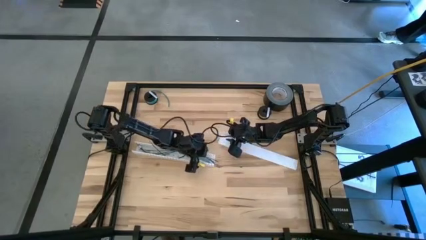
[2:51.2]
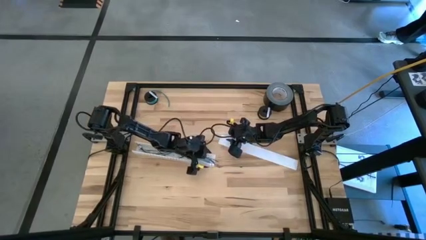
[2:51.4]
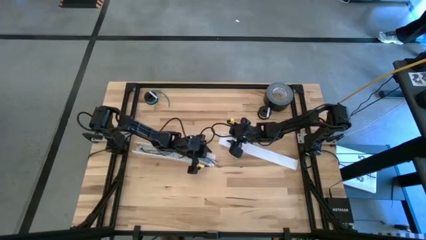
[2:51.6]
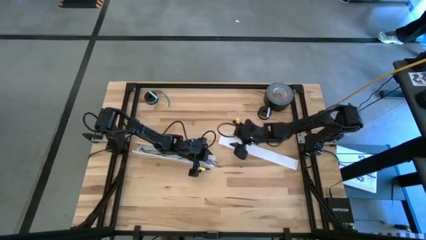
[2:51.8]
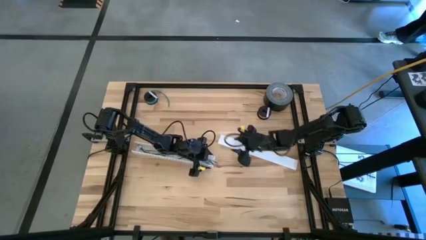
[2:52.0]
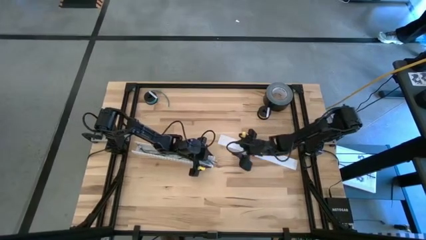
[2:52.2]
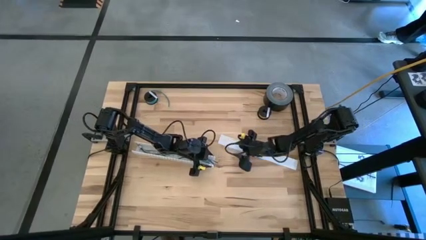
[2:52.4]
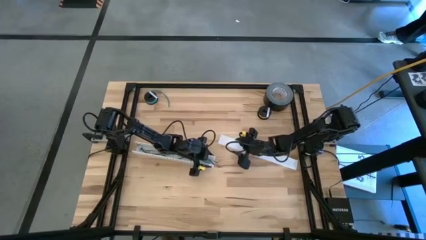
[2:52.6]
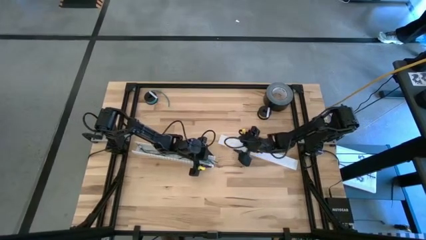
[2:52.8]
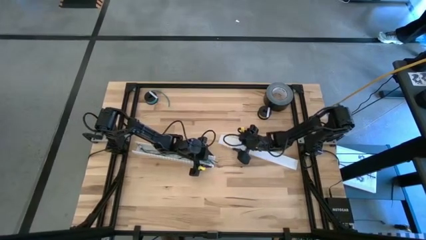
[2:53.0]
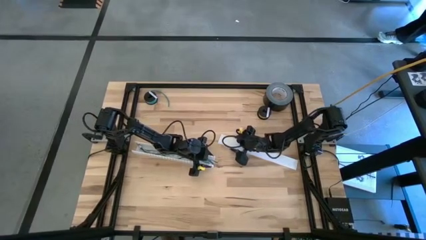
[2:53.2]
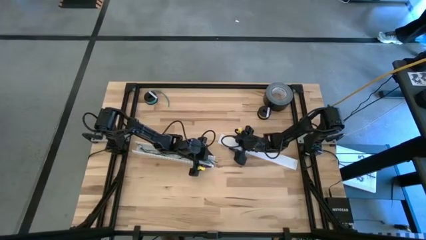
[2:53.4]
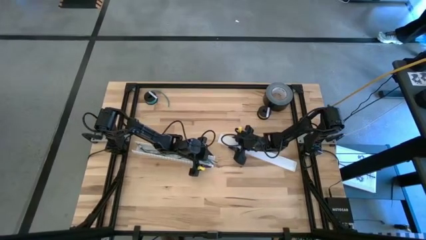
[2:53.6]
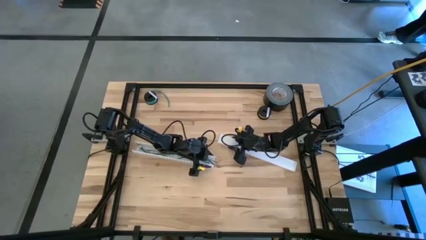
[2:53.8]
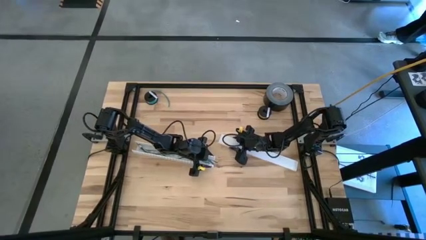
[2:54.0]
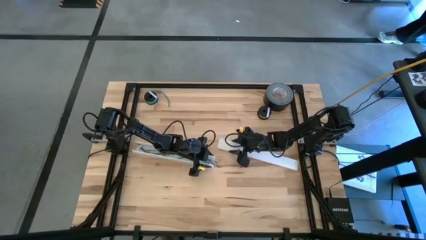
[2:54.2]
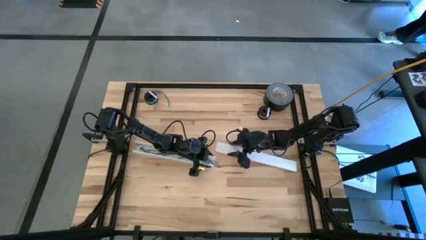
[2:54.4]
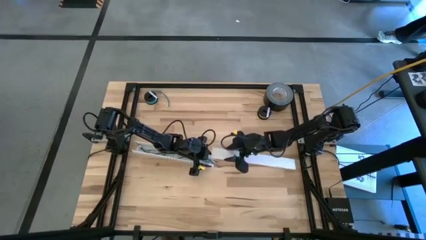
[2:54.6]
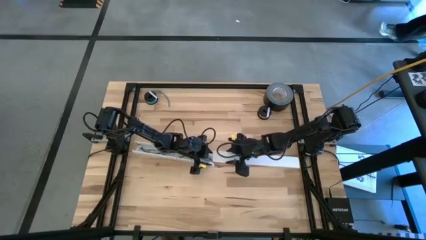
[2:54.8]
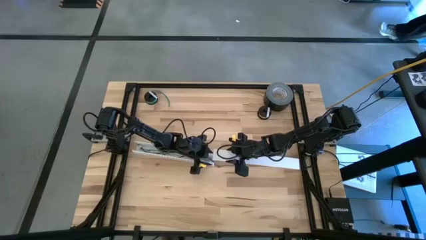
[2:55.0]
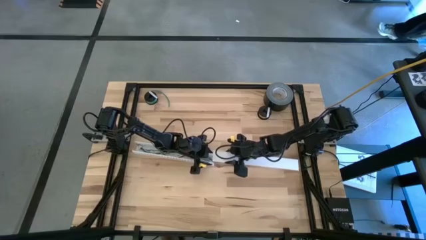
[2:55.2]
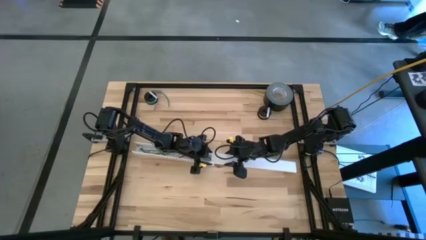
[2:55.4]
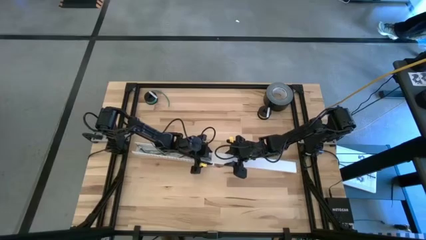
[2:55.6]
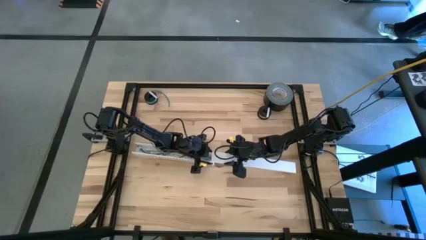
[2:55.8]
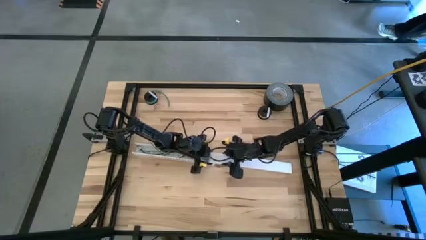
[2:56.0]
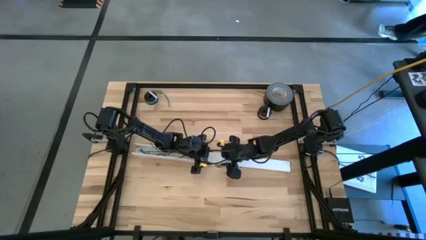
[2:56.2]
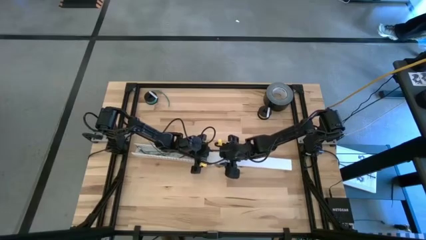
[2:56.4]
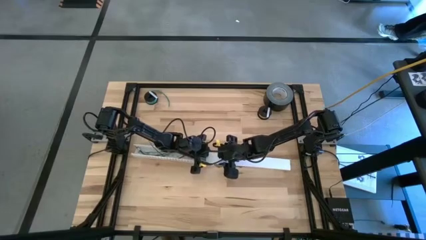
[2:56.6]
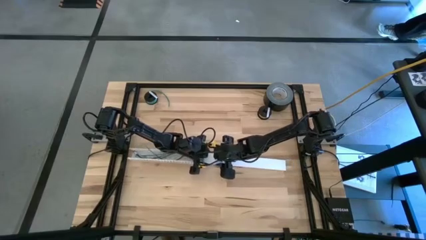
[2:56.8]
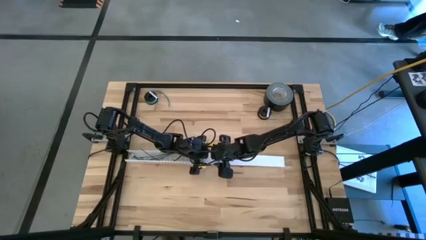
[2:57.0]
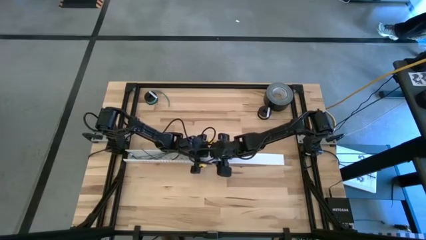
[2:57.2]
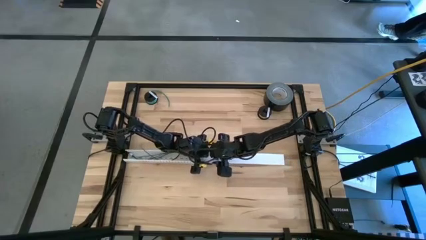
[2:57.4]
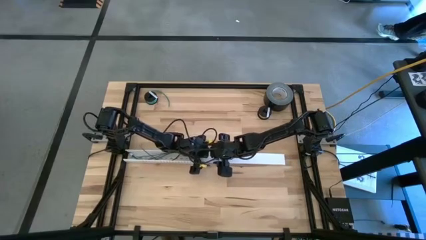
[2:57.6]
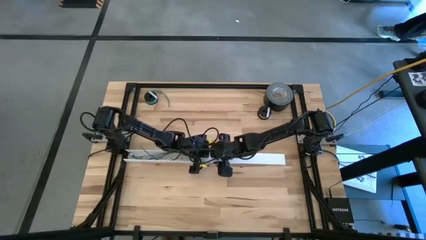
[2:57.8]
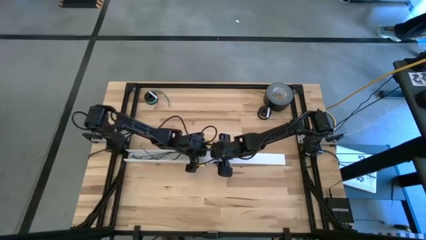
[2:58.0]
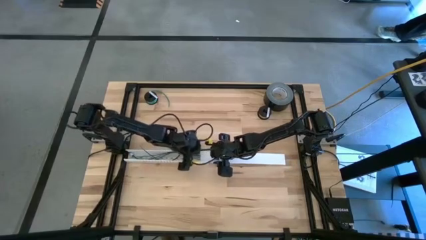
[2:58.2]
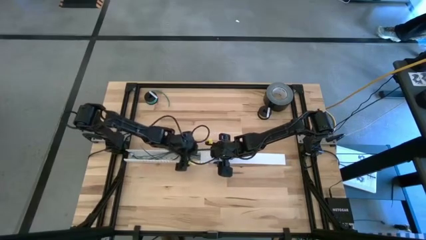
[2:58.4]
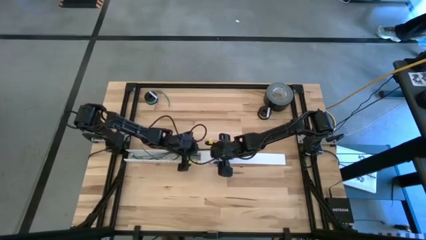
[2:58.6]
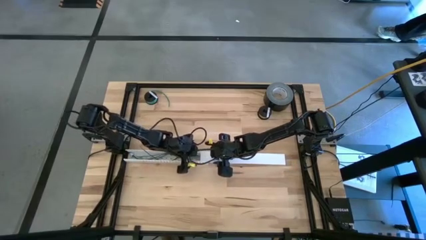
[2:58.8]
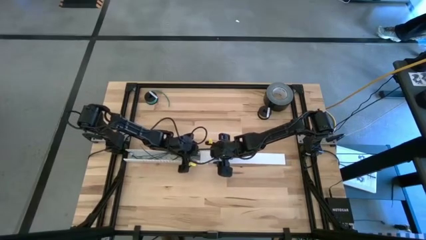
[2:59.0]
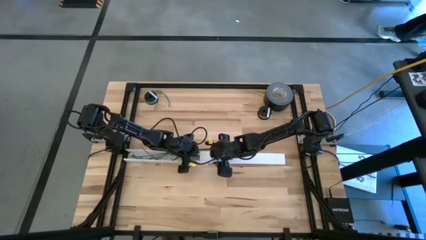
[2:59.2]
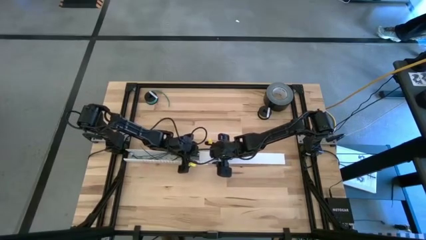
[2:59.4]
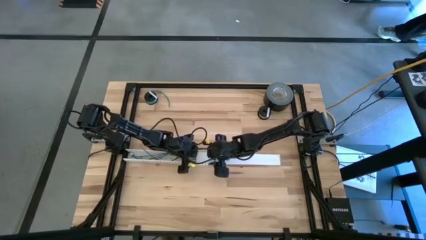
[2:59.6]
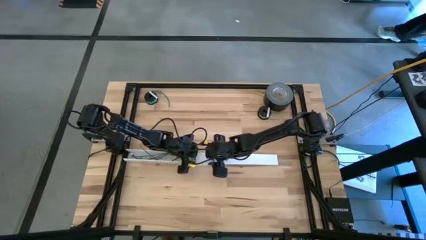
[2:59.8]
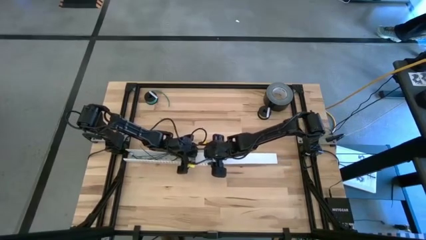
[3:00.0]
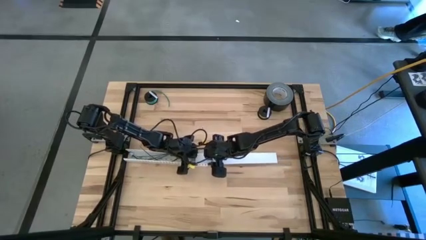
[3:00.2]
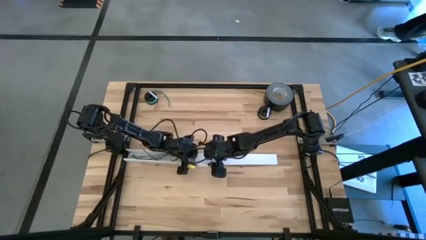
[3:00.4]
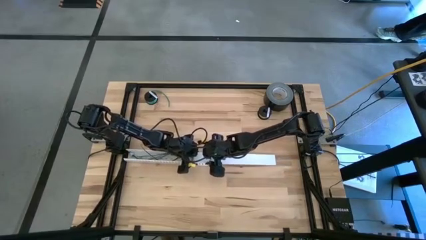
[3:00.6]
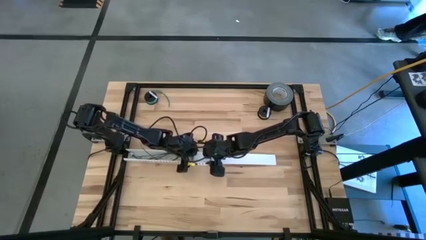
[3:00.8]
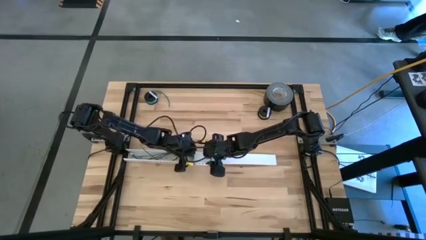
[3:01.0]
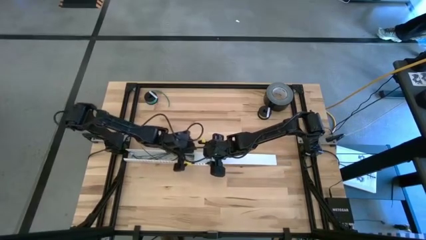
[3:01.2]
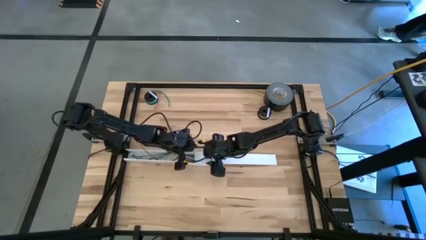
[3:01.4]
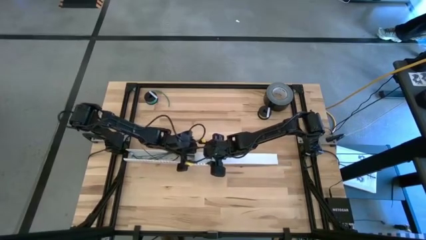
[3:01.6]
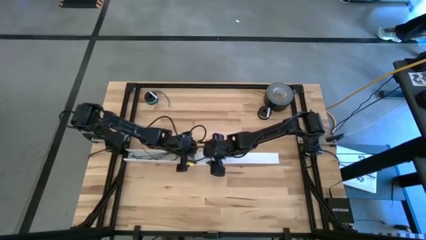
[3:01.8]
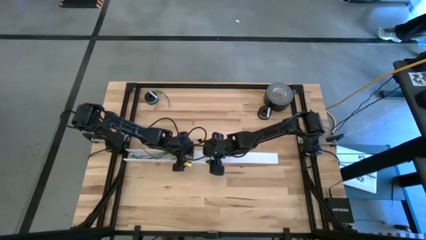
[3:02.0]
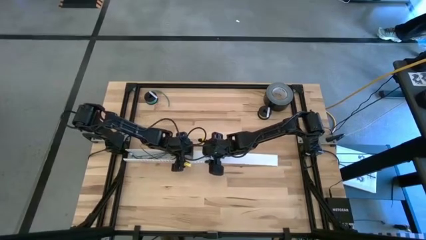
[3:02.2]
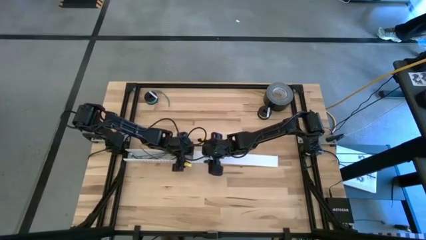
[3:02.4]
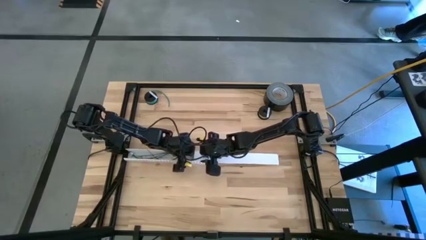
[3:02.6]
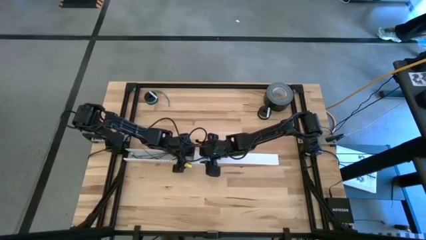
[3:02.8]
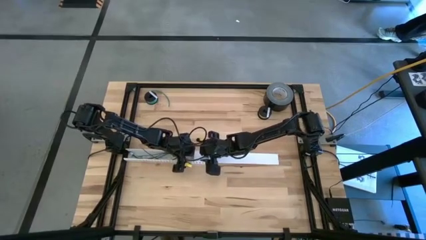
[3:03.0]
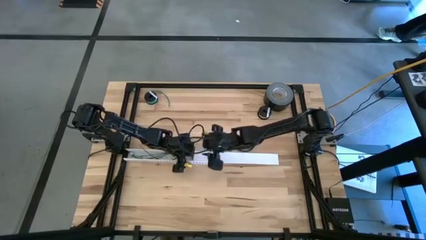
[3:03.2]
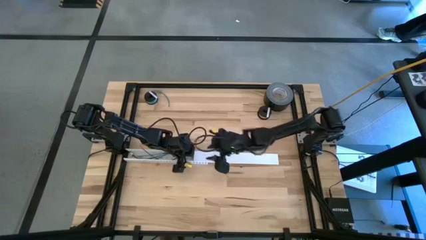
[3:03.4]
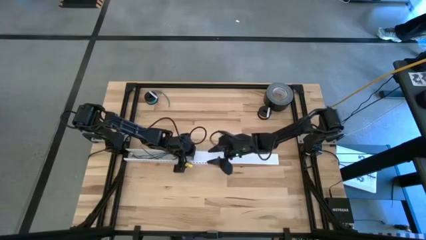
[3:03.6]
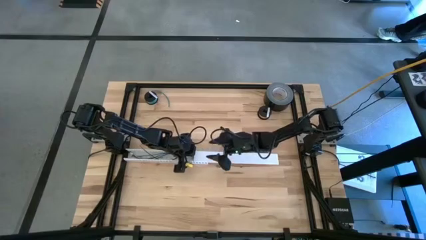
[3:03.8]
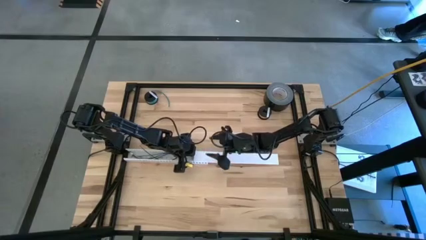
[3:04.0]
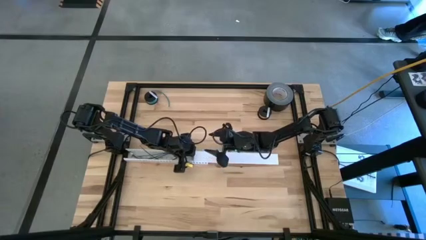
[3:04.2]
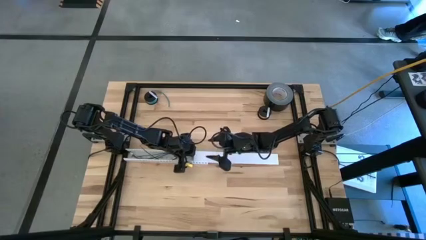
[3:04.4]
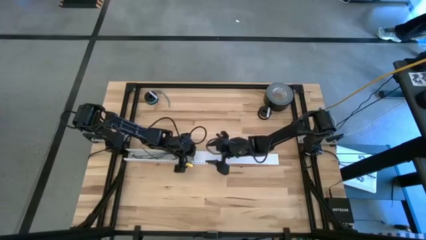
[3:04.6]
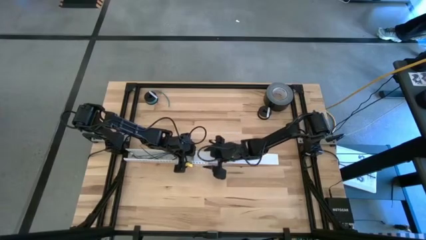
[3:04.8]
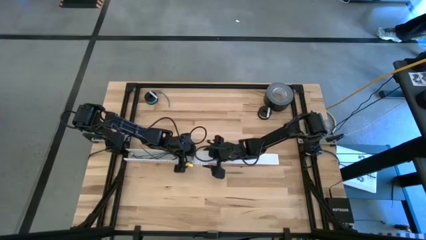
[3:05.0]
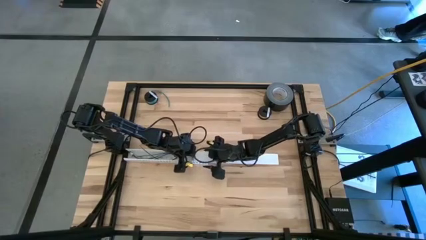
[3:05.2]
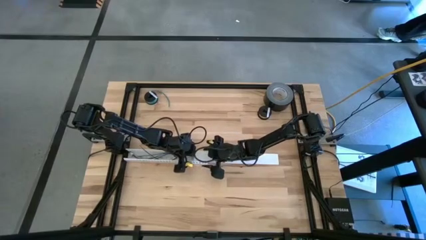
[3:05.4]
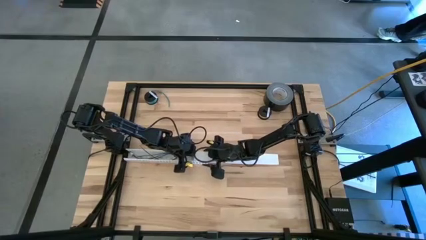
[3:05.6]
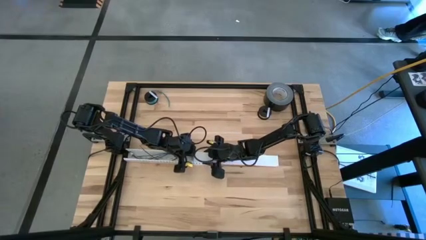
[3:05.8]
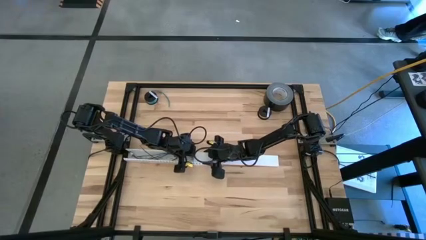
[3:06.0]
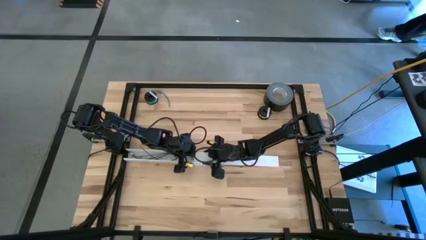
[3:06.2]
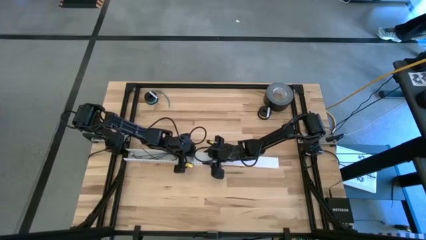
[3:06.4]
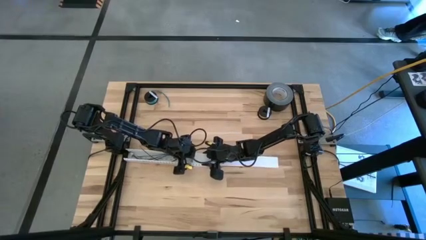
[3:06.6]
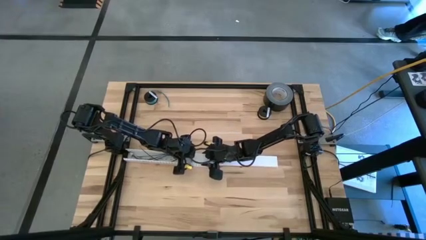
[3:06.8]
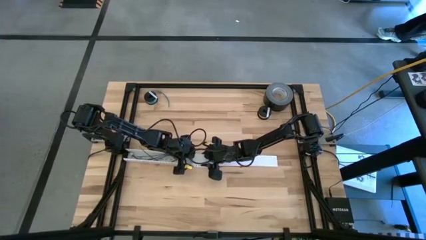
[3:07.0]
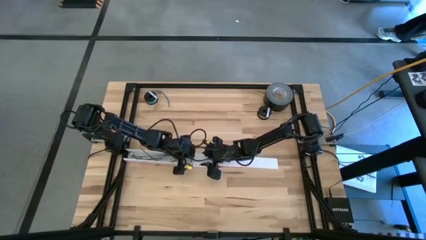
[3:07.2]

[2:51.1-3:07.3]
Task: Ziptie cables
Close the white cable duct

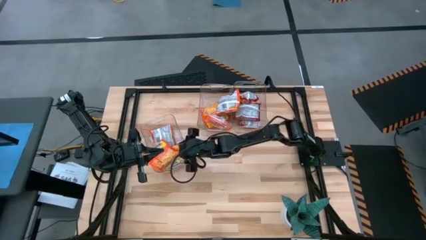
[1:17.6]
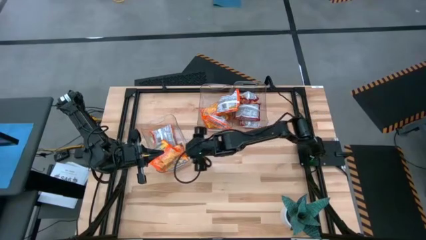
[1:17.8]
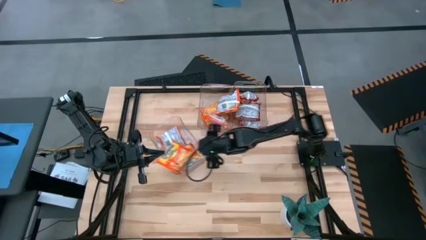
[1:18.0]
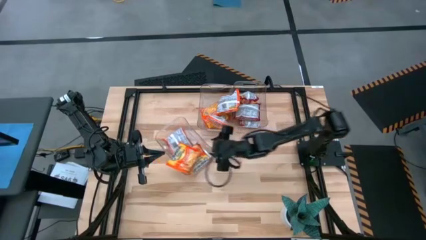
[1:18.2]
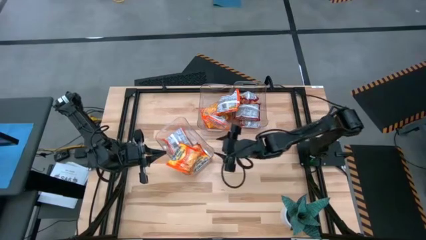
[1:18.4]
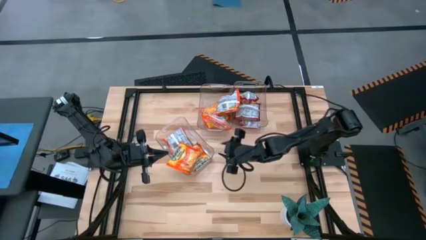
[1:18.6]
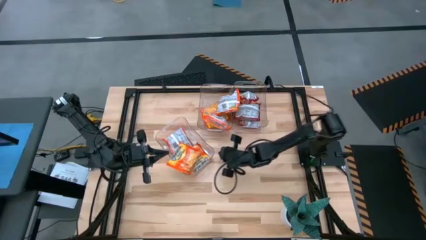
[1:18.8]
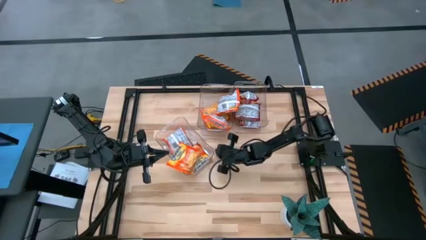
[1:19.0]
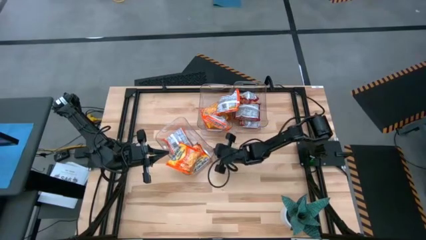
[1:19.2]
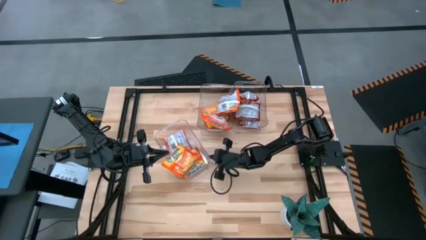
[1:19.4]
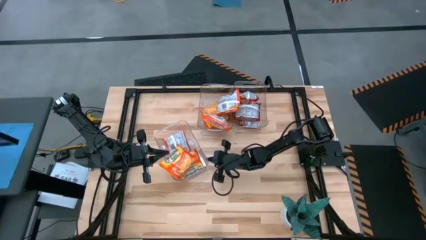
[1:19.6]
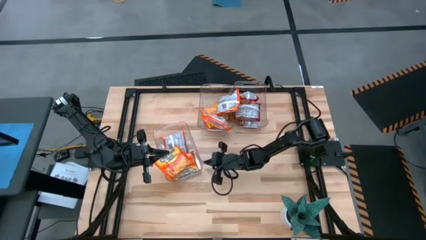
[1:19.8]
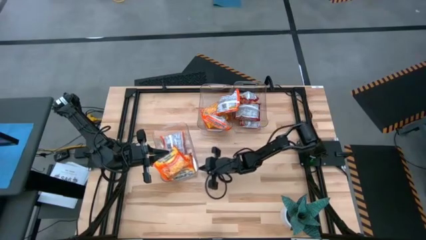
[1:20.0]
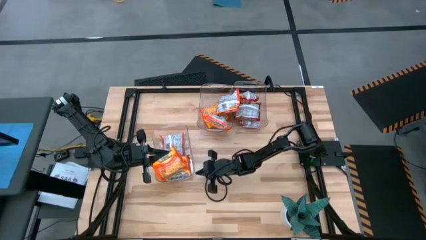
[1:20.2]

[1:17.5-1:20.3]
Task: Sort Maruchan noodles
Adjust the bottom left transparent bin on the table
